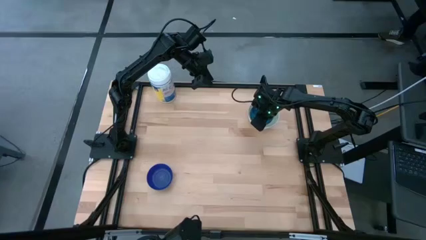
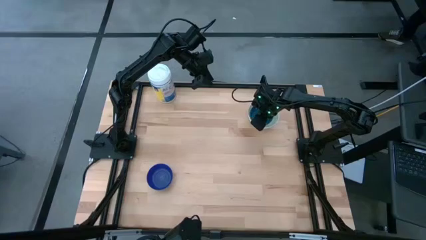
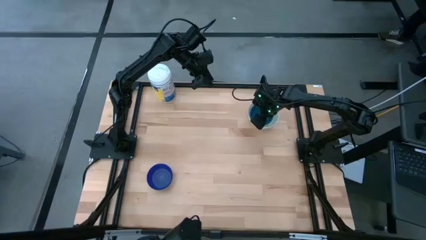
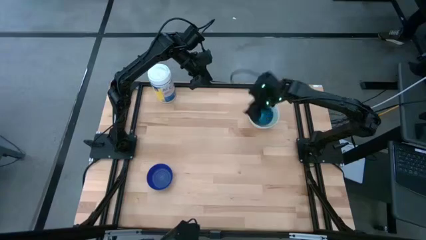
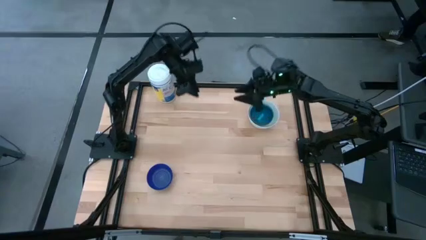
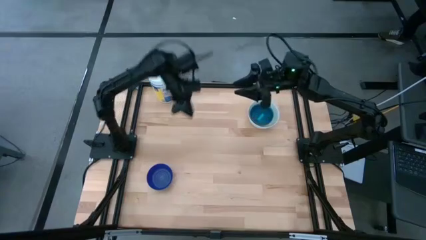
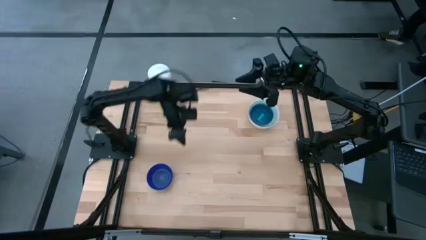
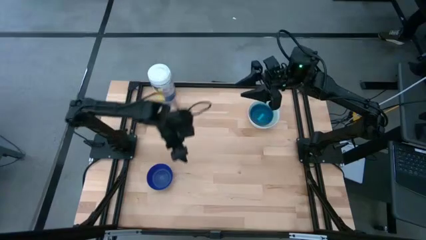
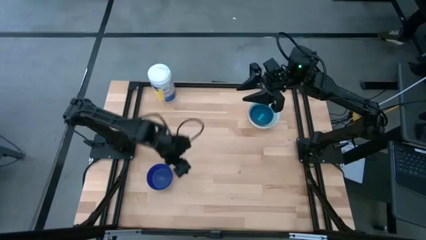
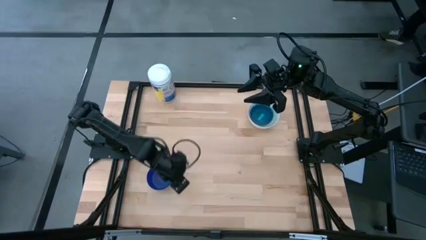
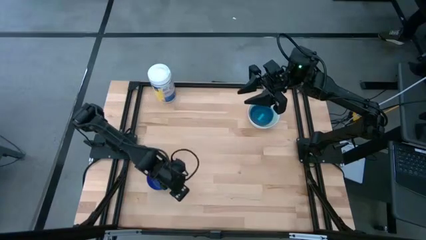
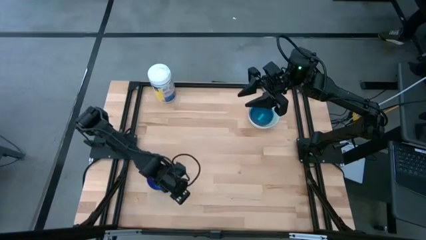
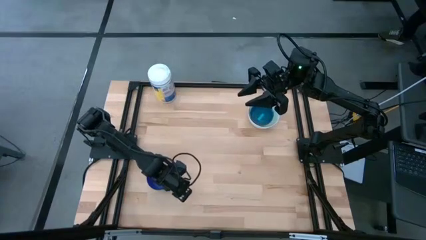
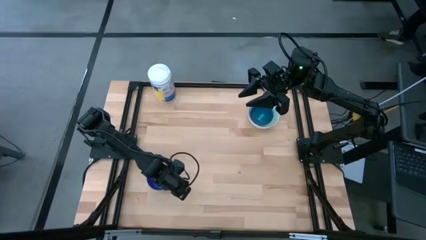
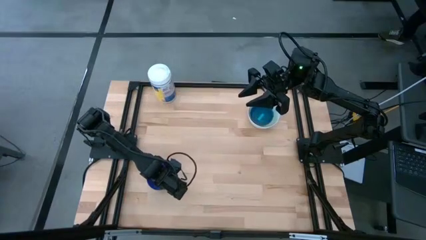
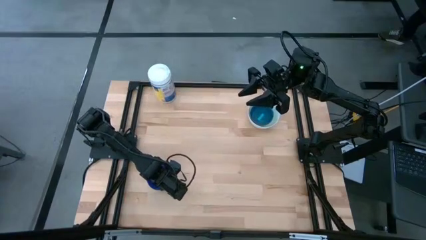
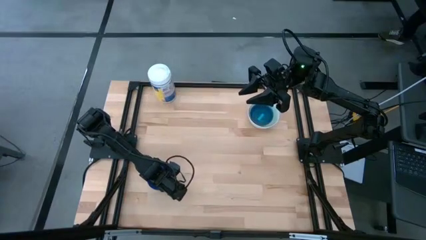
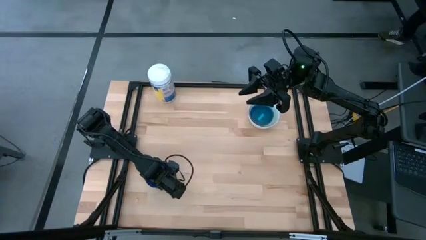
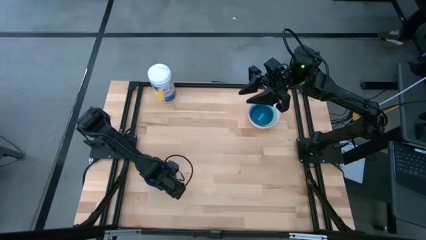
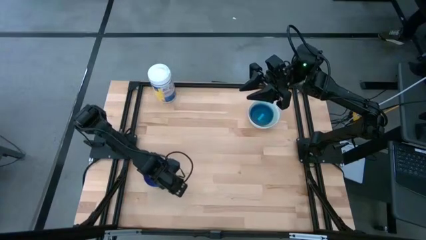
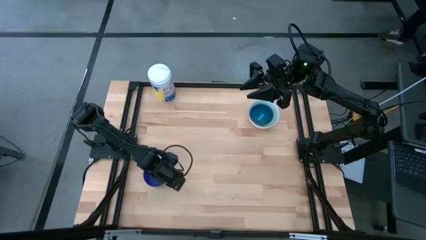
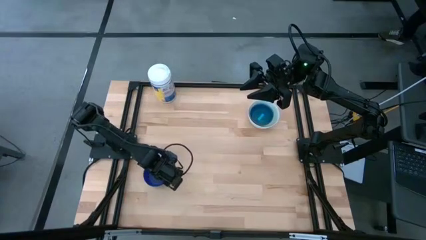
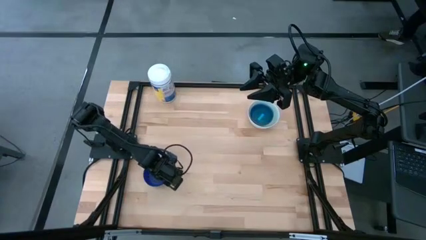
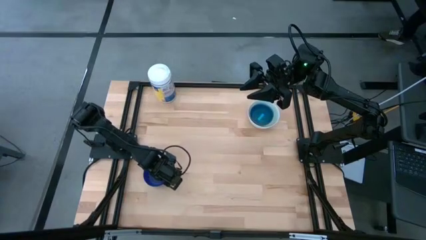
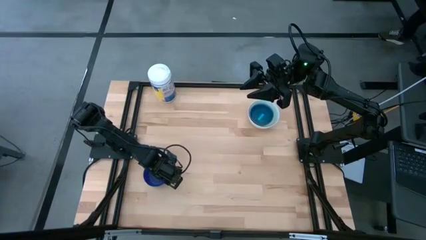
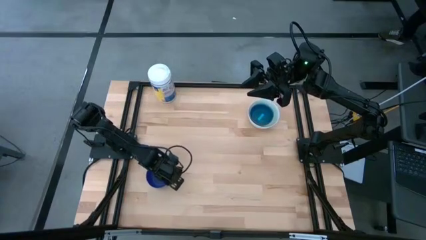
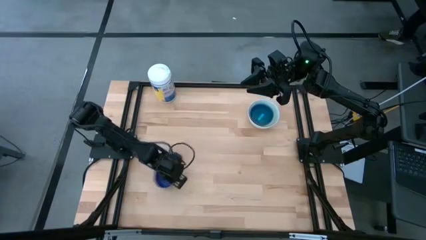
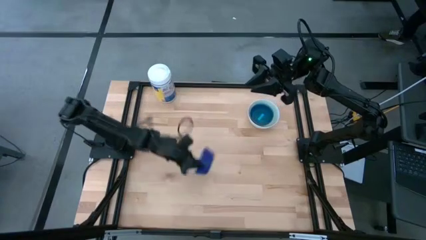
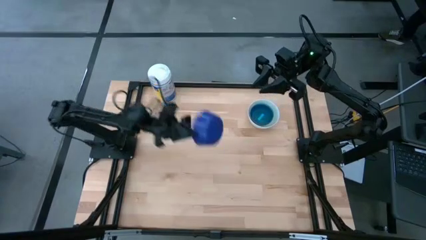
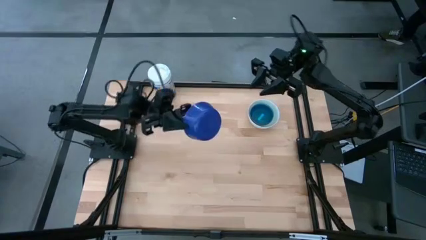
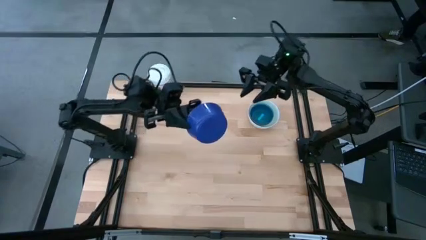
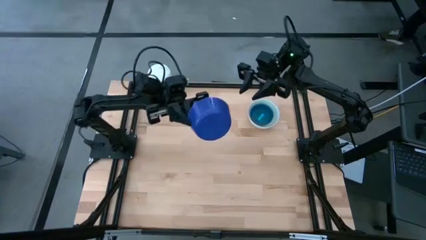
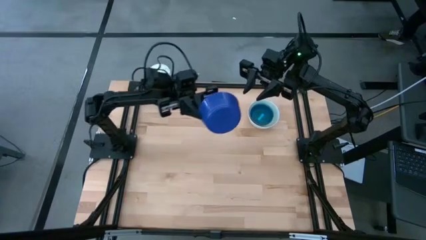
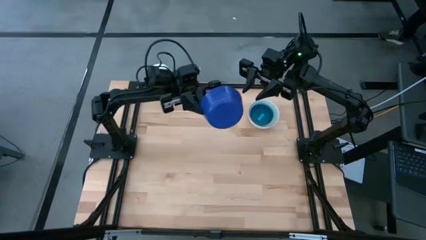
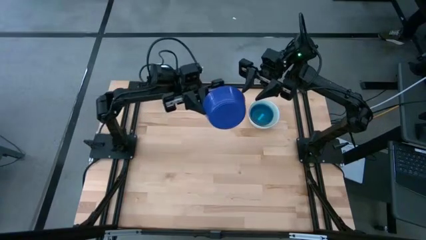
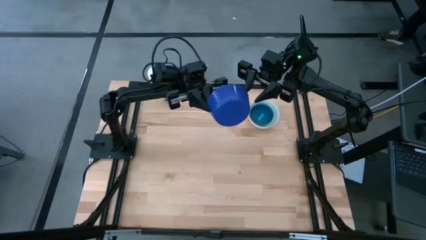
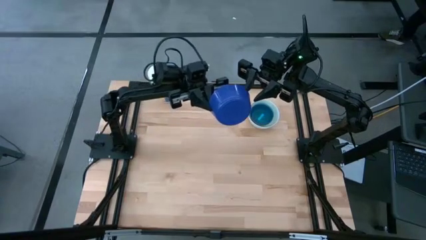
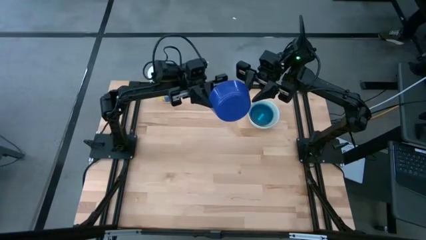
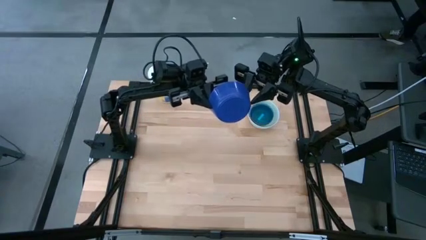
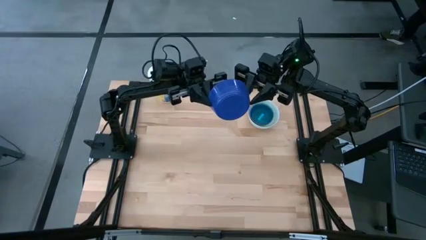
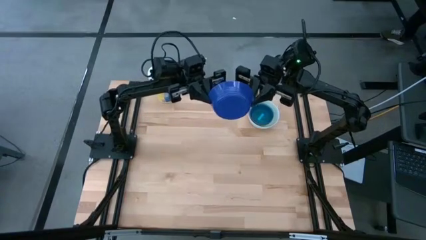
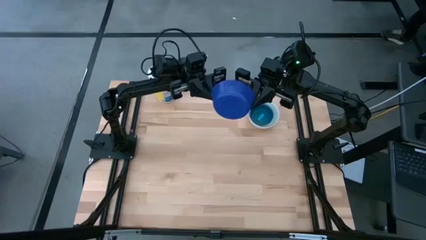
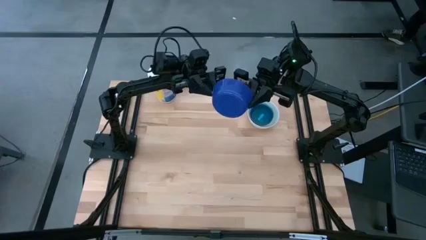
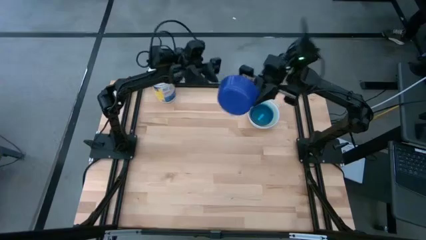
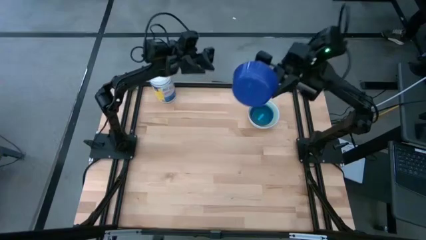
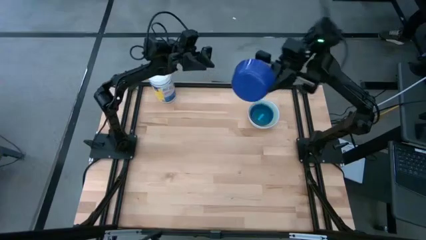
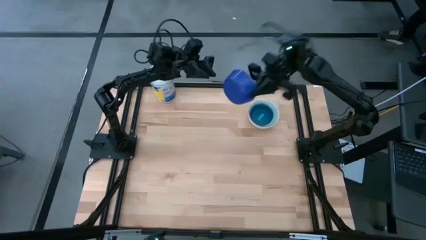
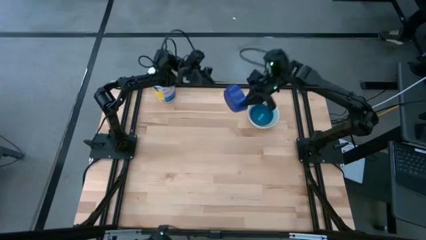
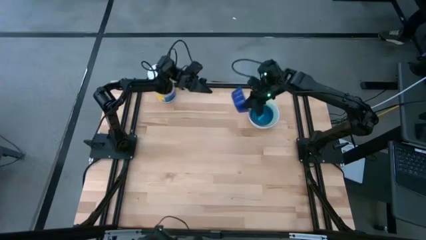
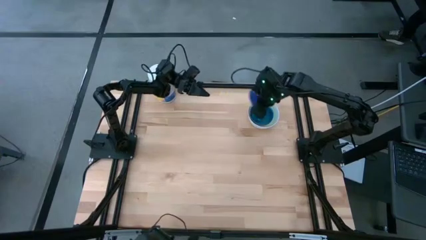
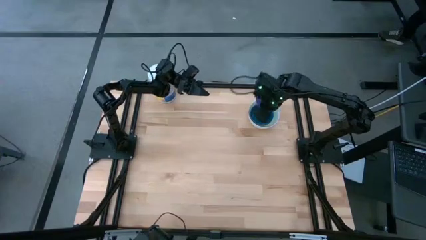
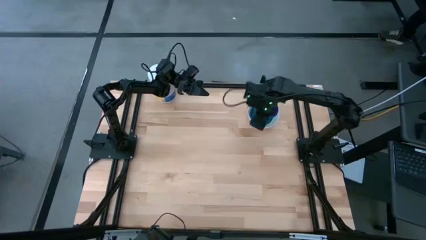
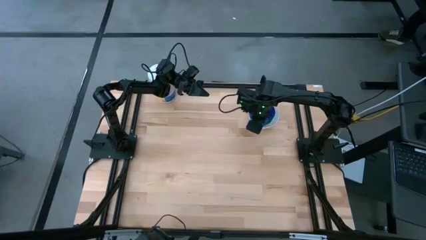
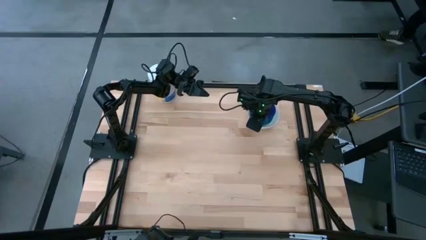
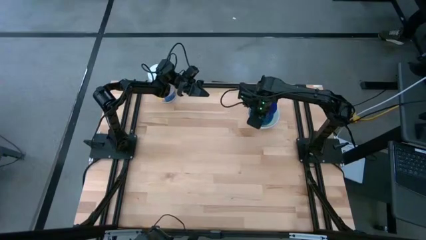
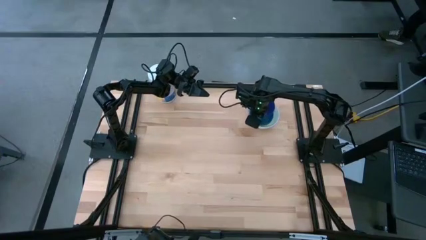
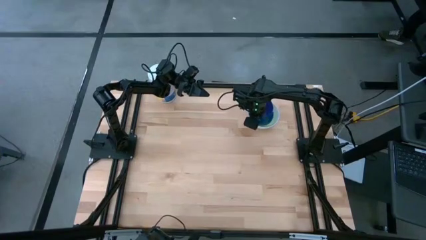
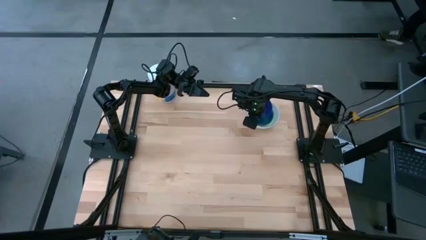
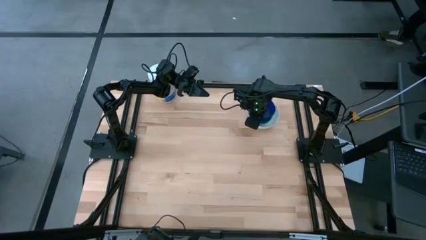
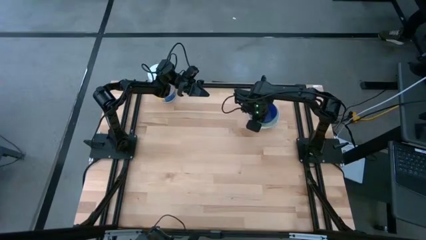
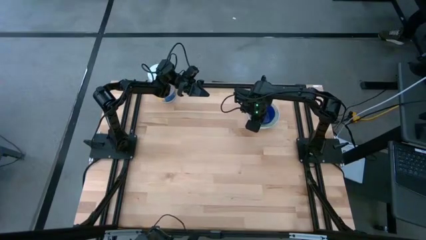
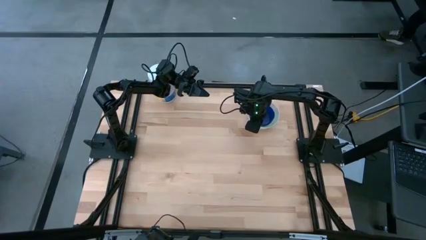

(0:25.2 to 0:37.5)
Stack the deep blue bowl l on top of the light blue bowl

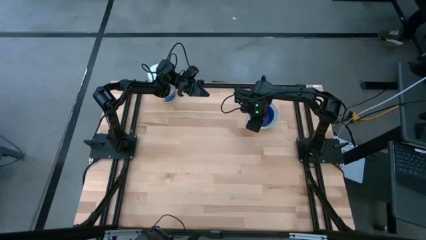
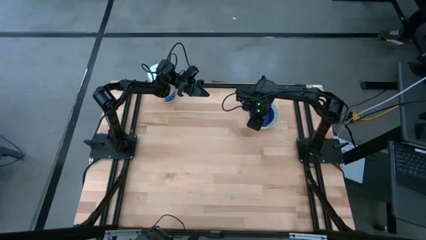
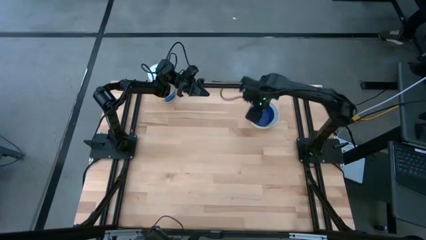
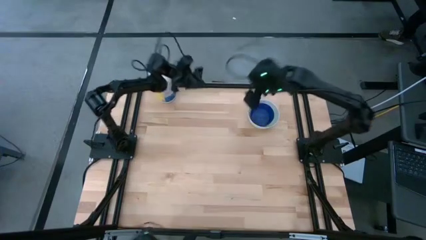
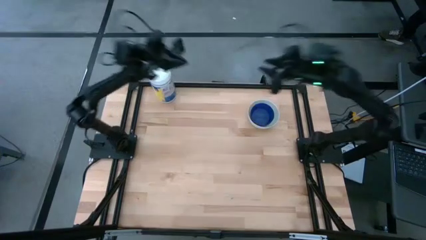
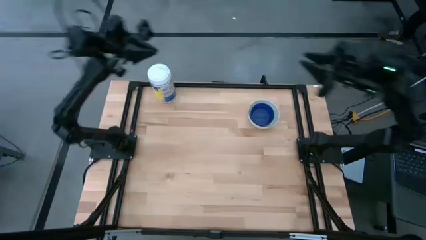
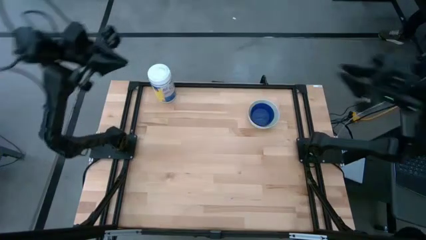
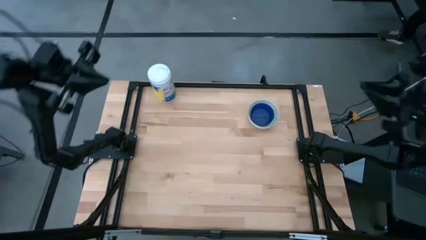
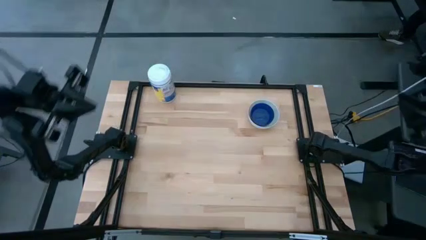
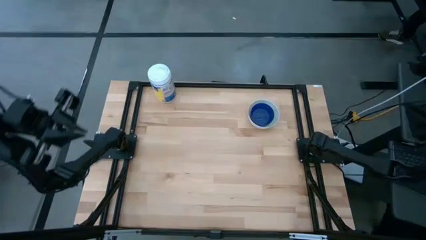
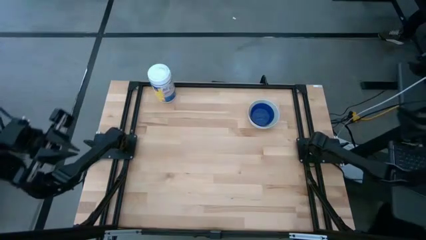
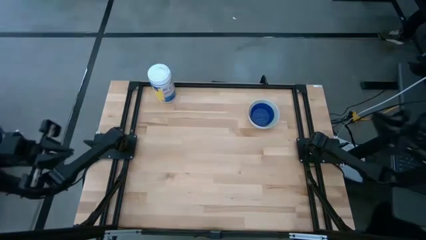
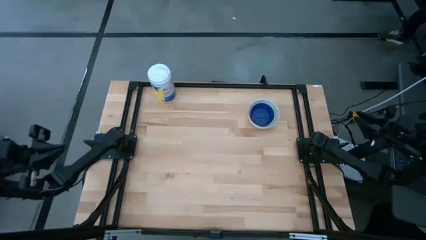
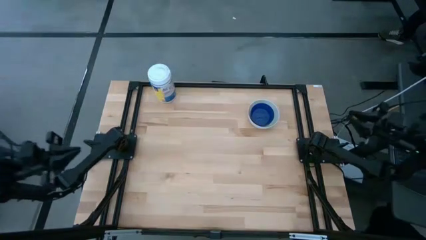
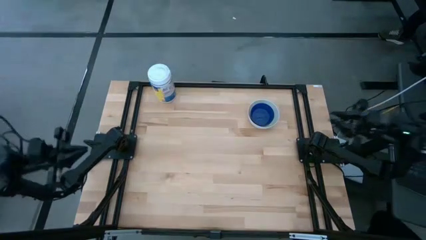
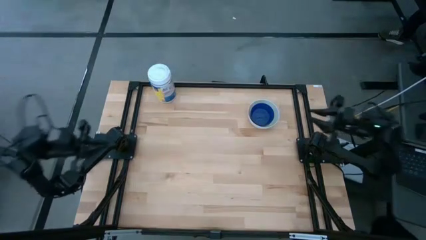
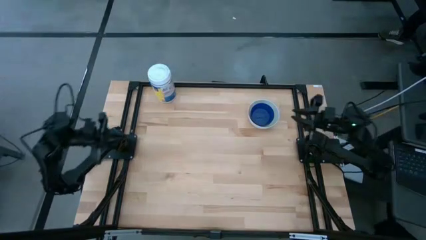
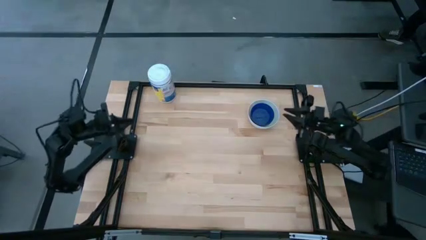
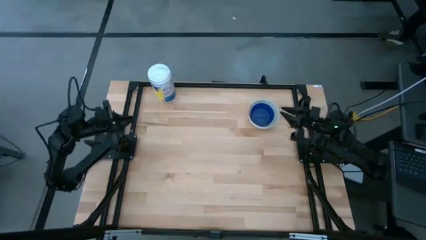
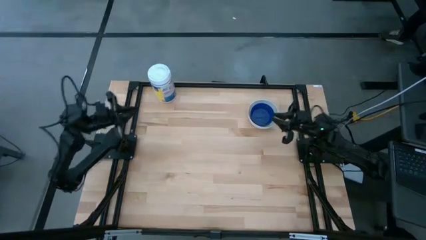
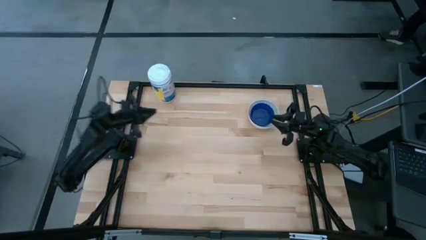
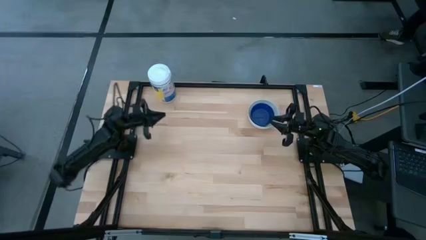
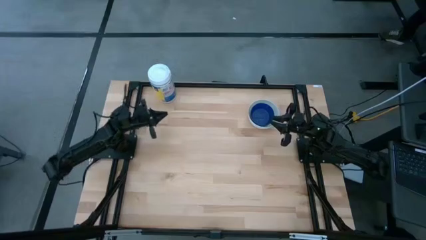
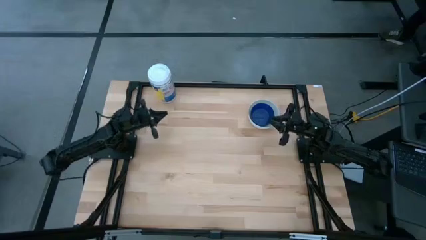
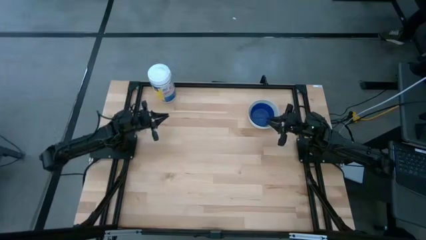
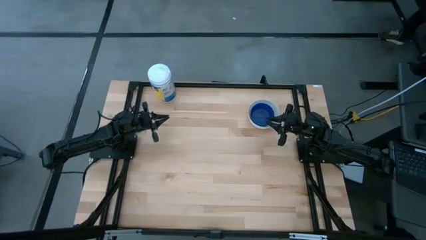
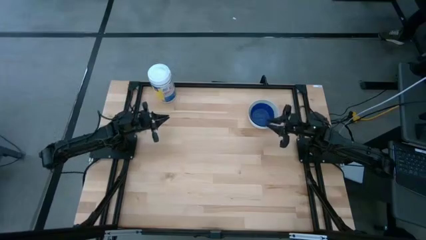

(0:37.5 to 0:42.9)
Return to Home Position
